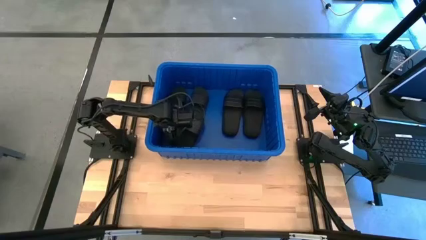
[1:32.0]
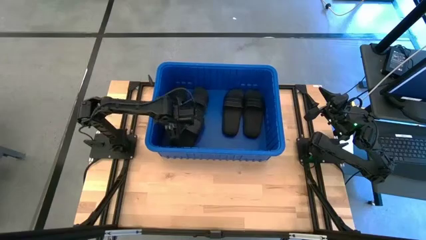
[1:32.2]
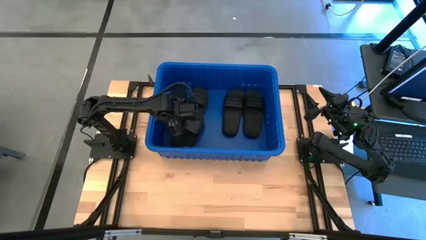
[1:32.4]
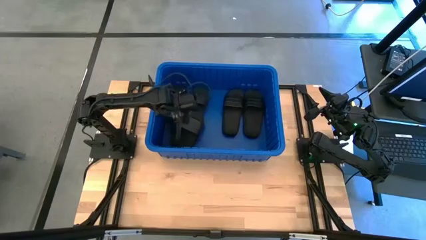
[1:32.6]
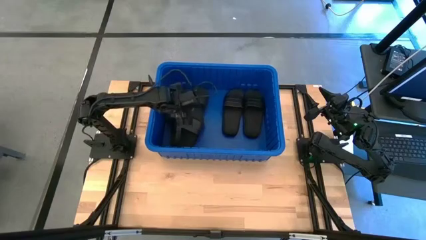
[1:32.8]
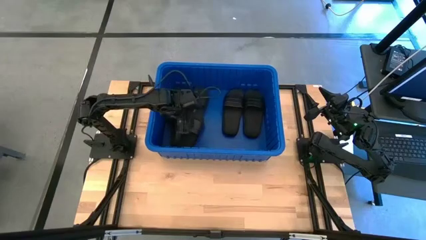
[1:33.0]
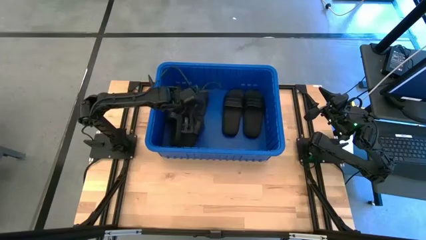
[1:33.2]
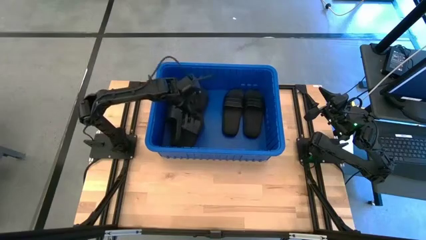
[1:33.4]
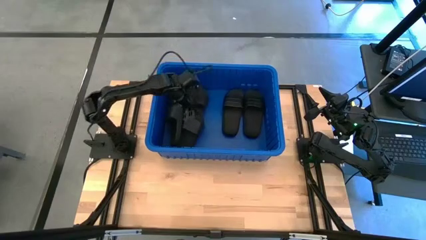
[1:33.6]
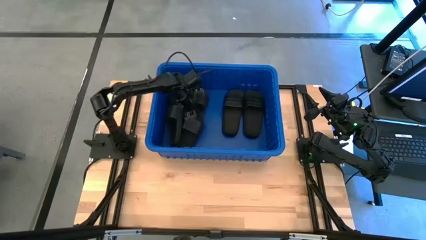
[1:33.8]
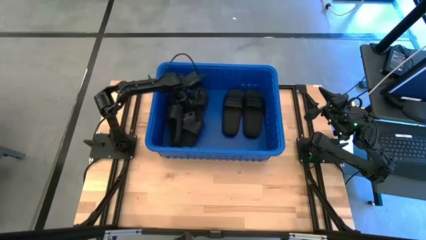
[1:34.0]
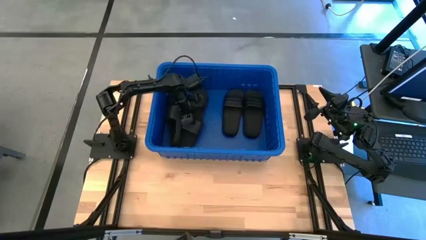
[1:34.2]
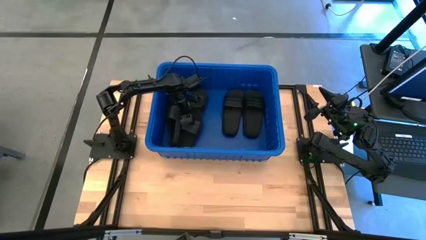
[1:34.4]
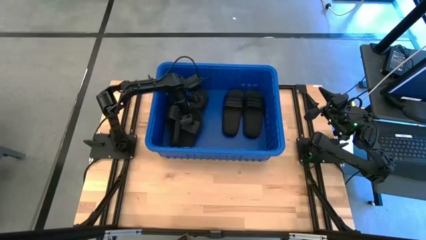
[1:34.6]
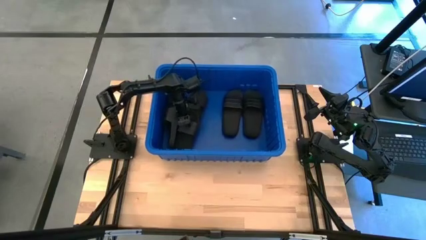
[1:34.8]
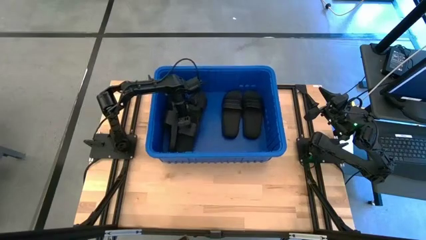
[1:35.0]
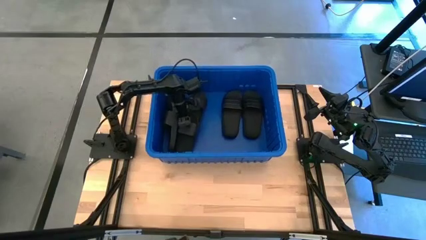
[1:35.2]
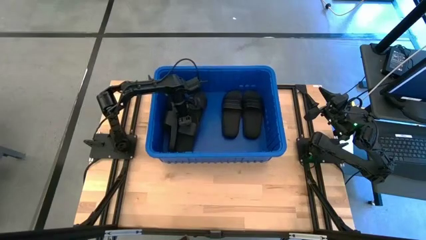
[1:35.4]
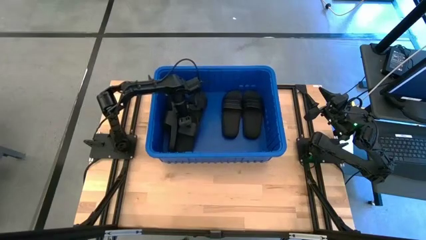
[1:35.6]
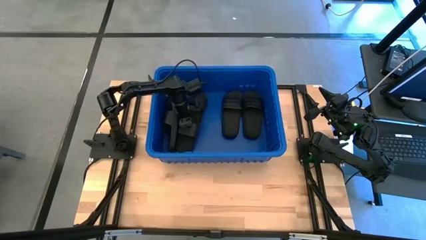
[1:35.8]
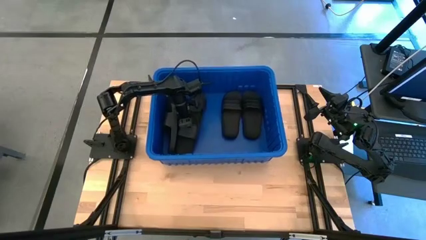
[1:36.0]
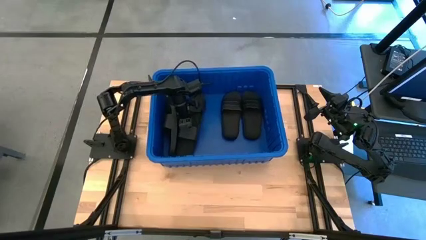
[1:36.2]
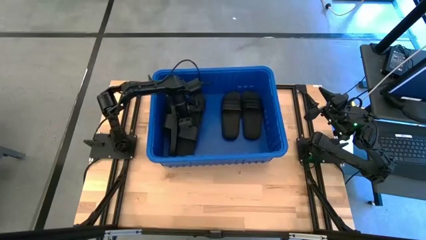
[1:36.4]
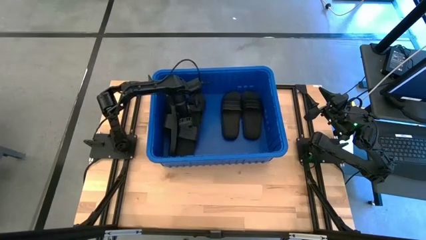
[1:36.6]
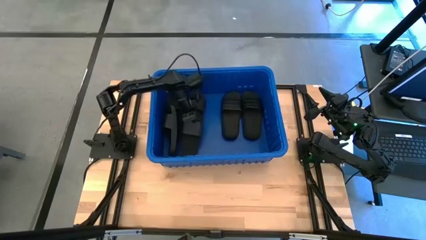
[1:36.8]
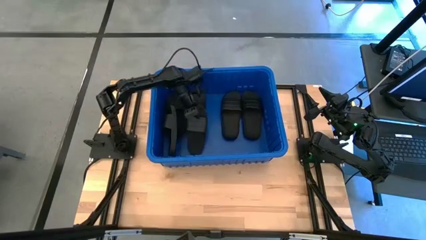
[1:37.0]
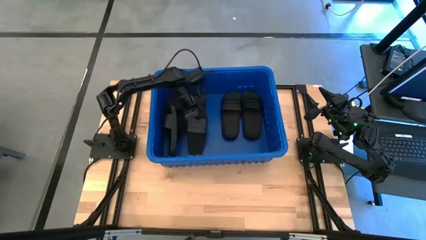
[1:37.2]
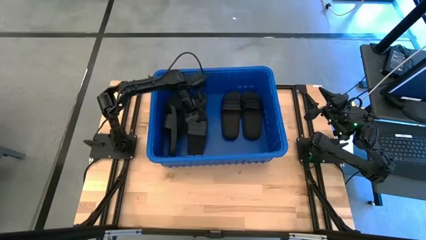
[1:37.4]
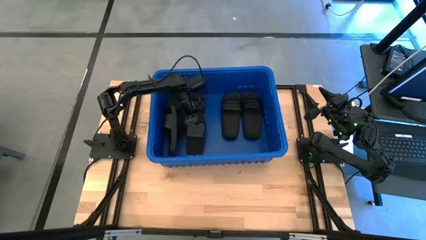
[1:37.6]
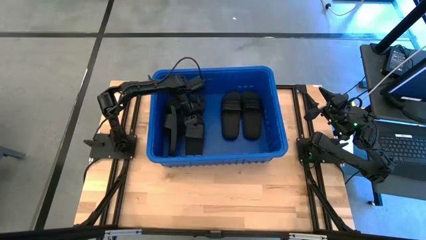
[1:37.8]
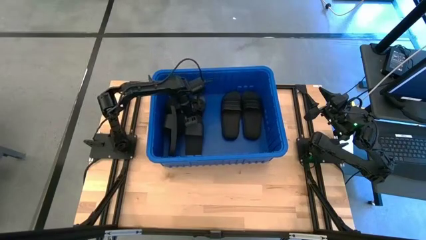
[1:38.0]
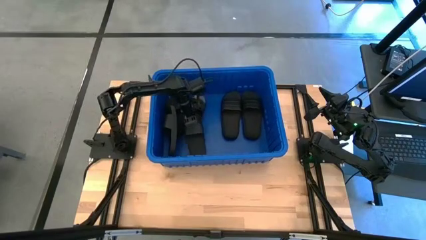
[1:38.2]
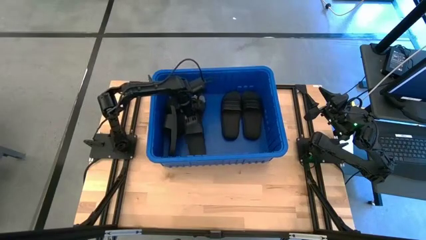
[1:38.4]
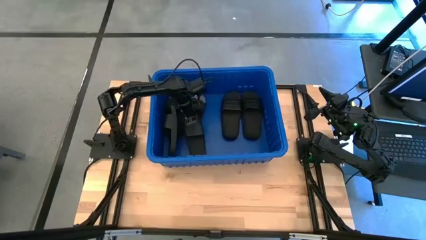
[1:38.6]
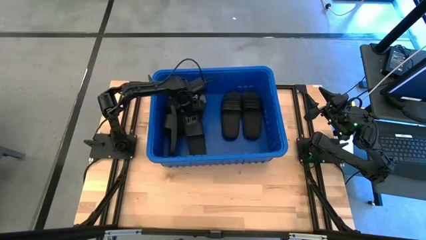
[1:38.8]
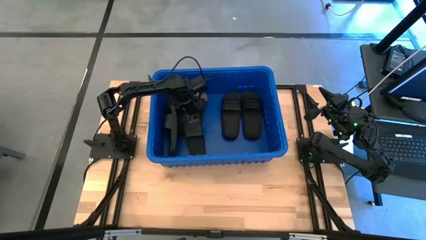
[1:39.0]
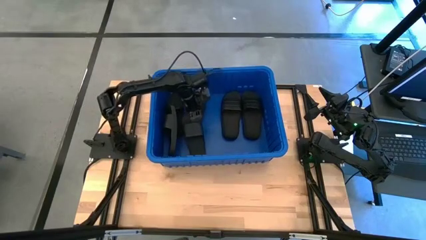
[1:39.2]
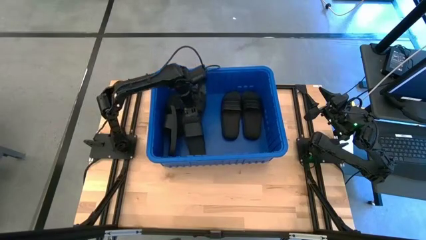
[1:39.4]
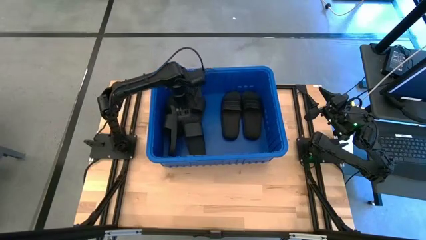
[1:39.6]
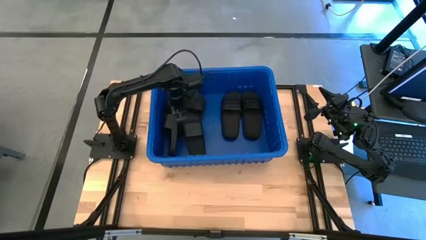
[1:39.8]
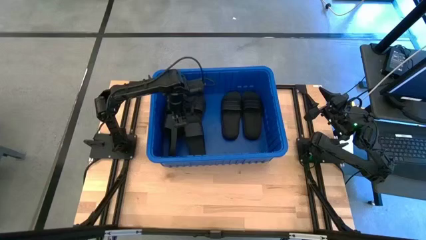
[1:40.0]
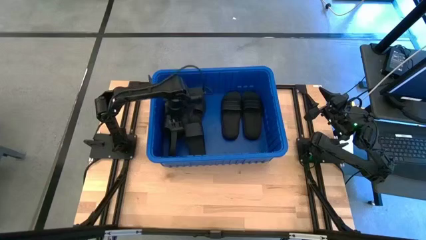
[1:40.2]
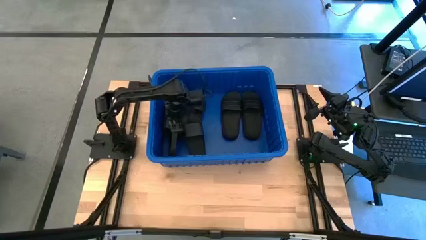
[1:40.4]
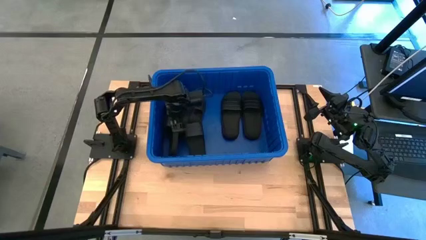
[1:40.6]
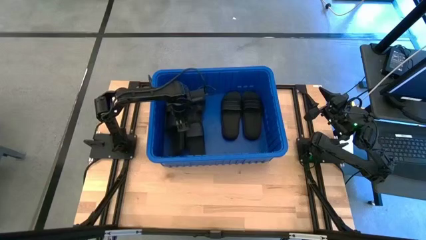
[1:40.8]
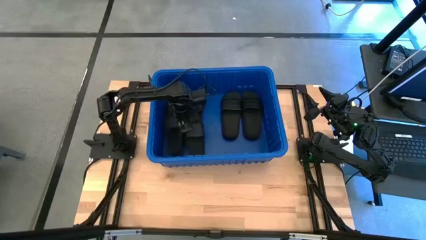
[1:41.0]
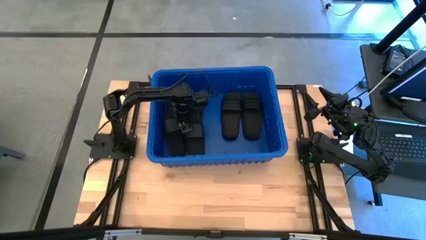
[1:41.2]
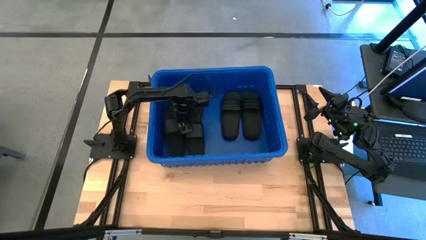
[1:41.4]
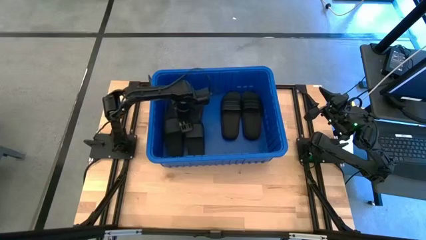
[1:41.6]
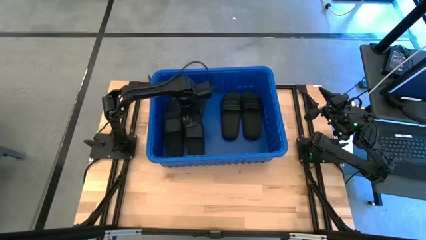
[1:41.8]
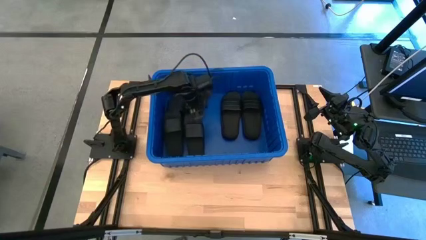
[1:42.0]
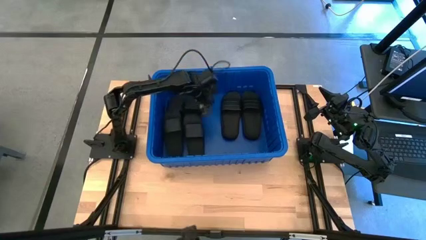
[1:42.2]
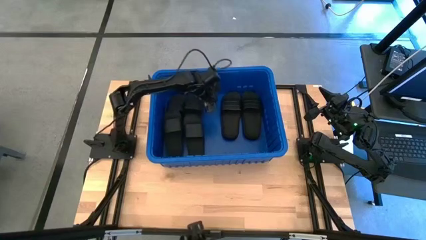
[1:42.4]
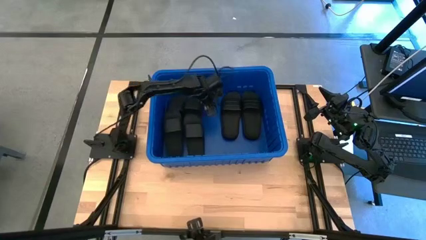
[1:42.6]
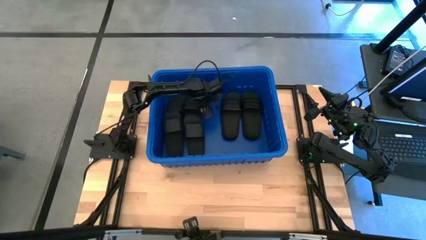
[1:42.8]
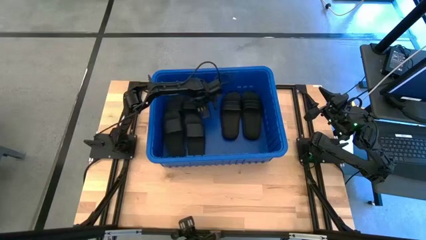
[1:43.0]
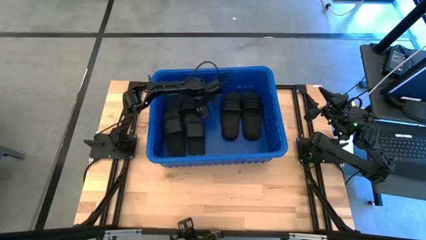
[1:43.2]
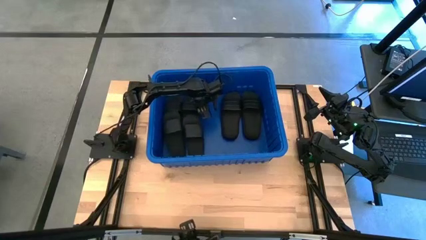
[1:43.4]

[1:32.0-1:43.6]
Task: Pick and place slides into bin
Adjust the black slides in the blue bin
